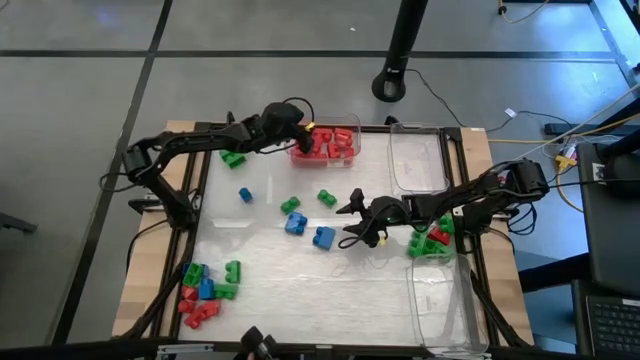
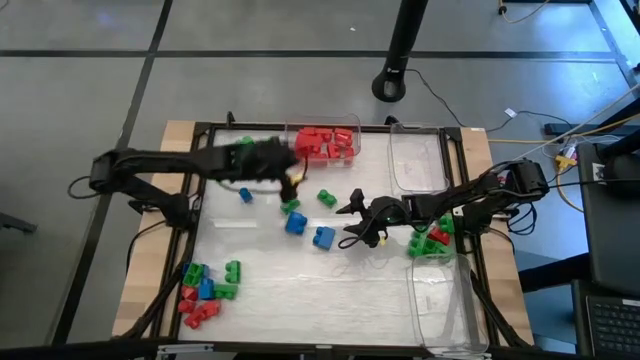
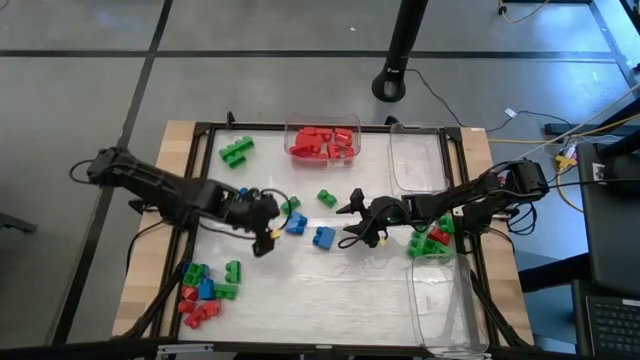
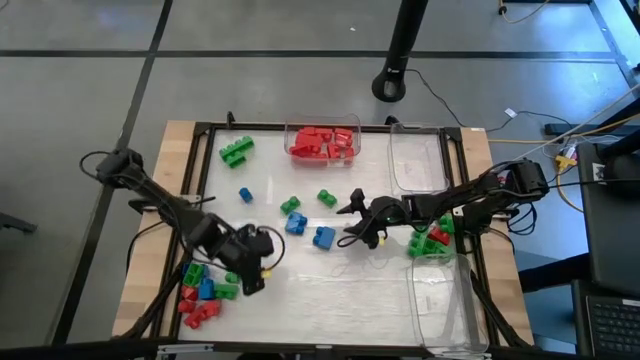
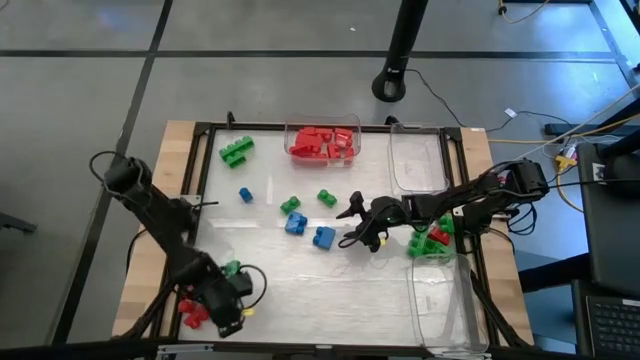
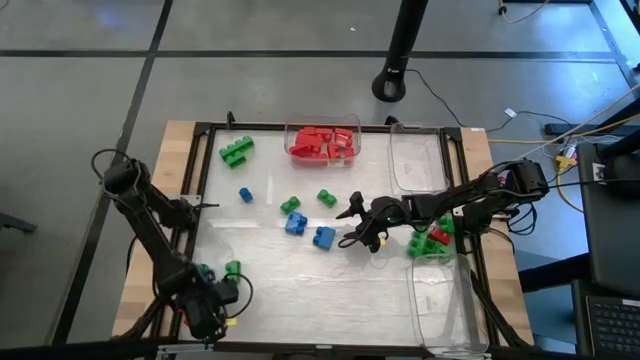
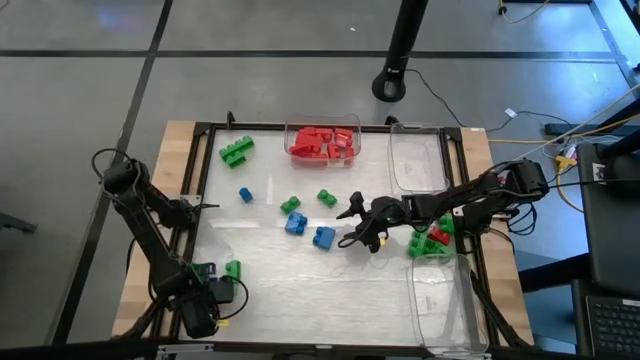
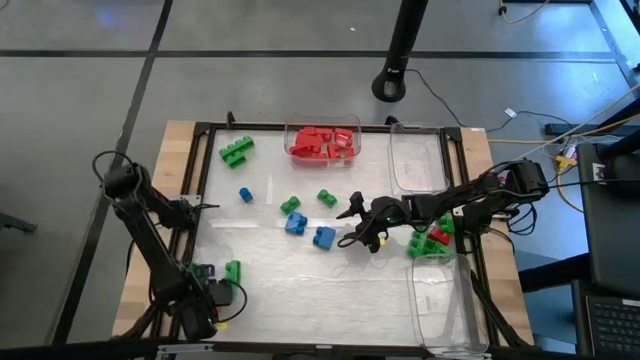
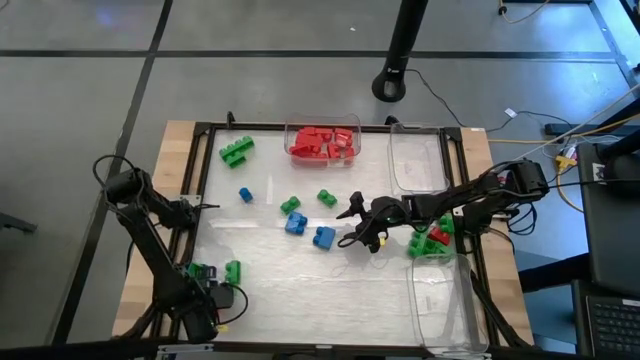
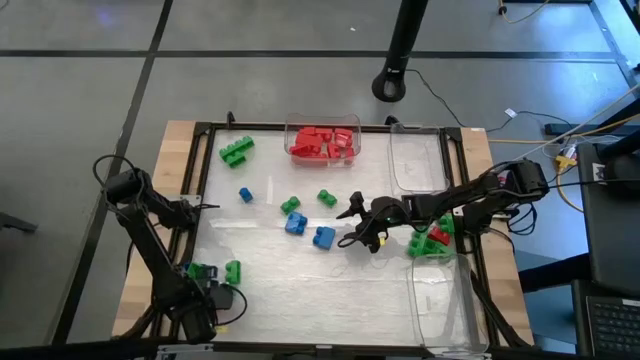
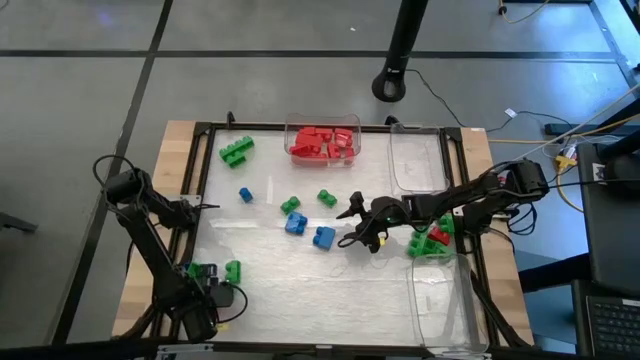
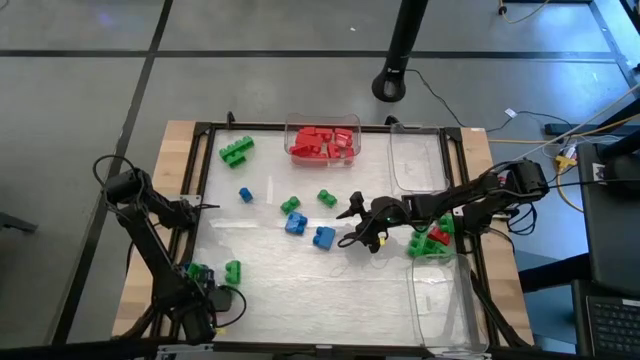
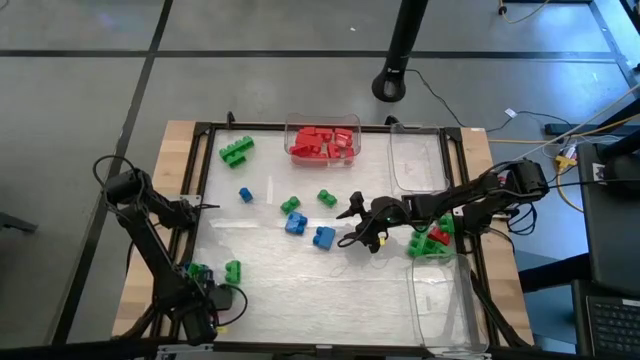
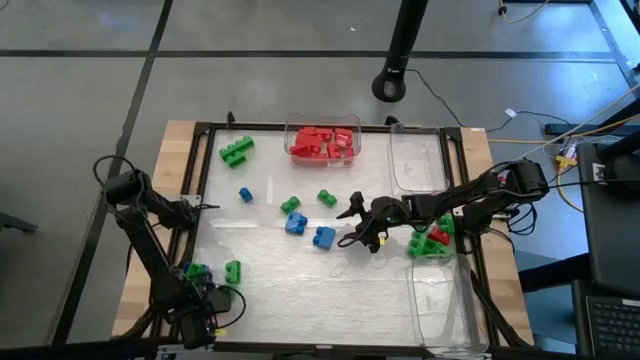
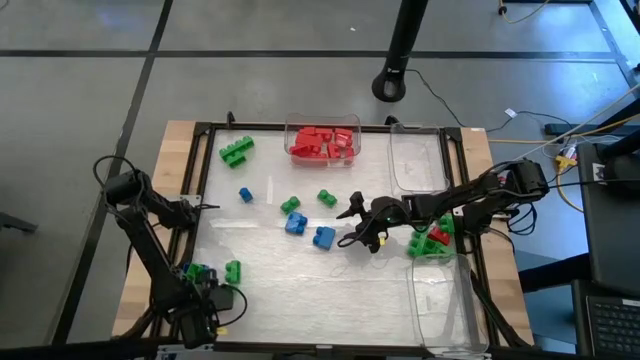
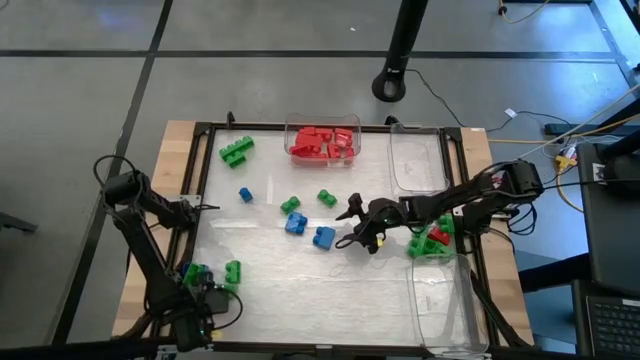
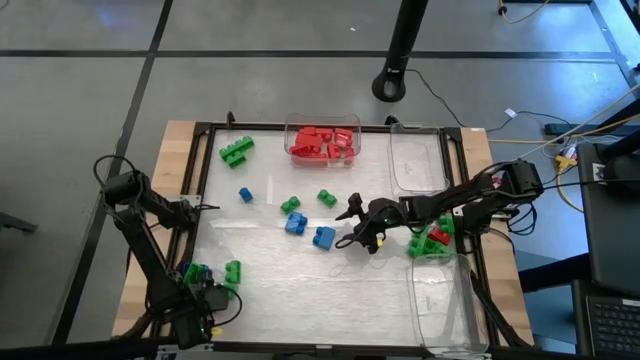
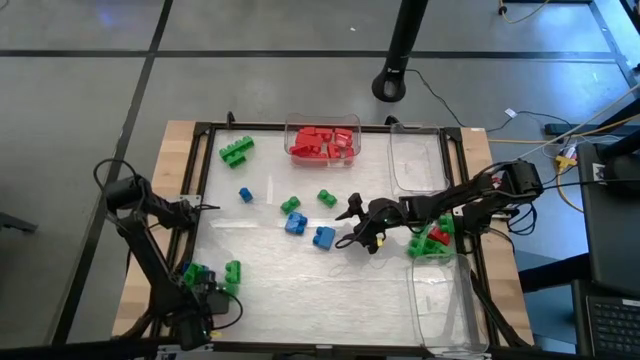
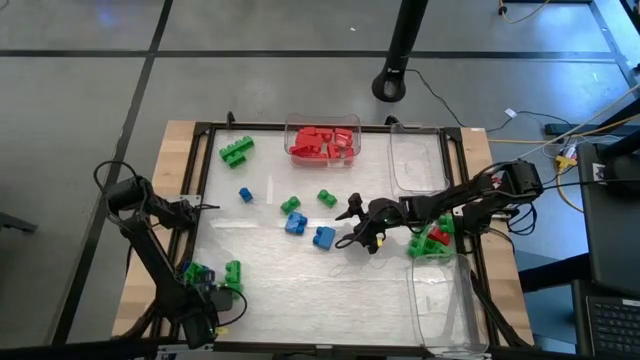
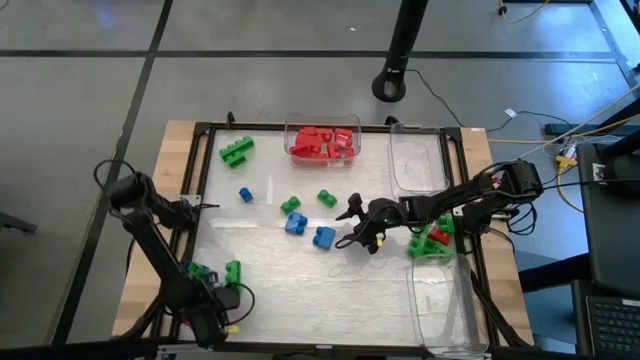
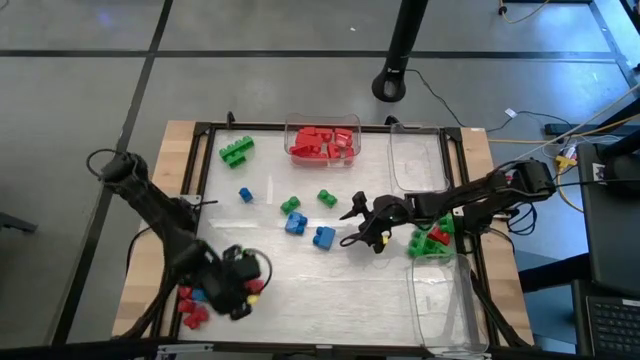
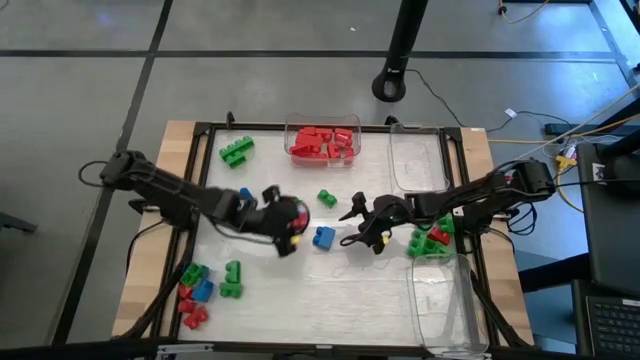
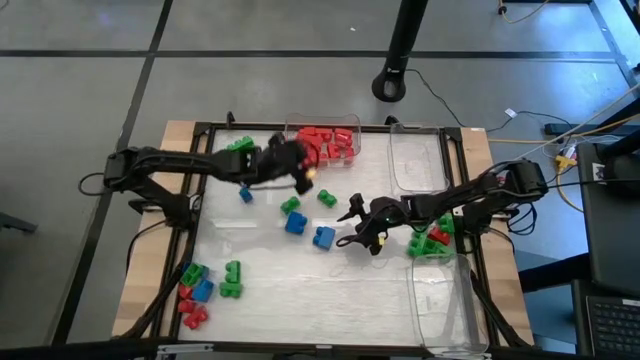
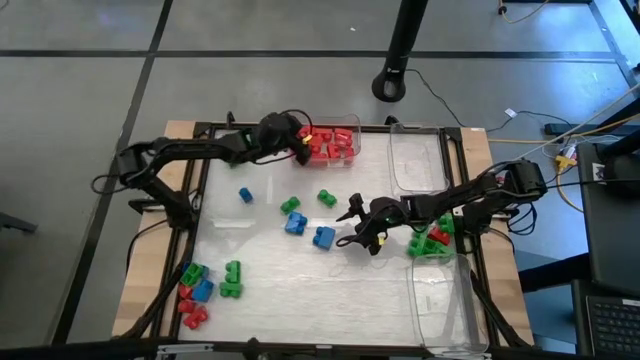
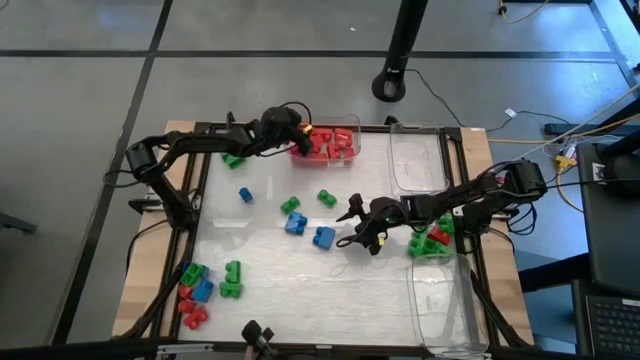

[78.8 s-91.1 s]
Task: Sort blocks
Put the red game piece into the top left transparent bin

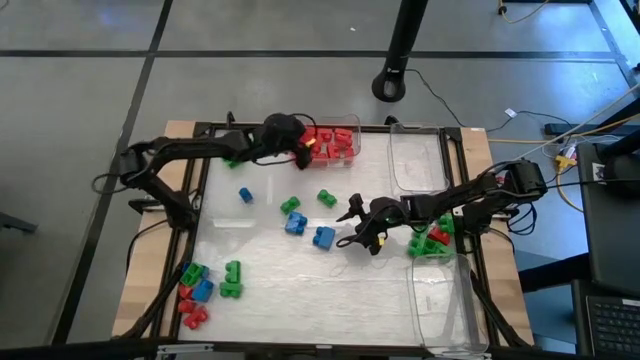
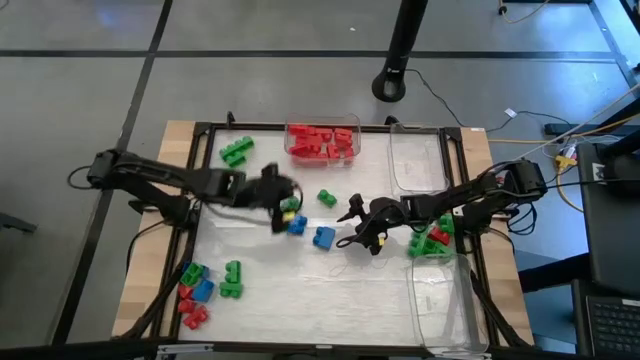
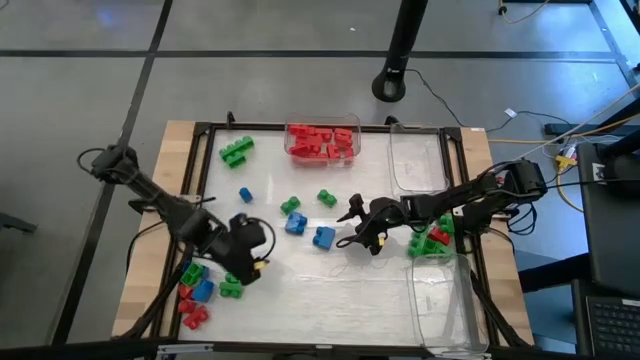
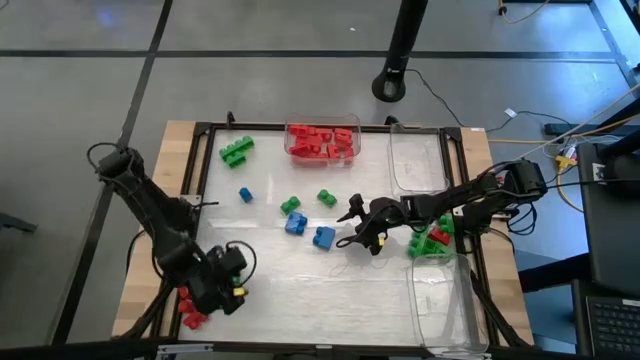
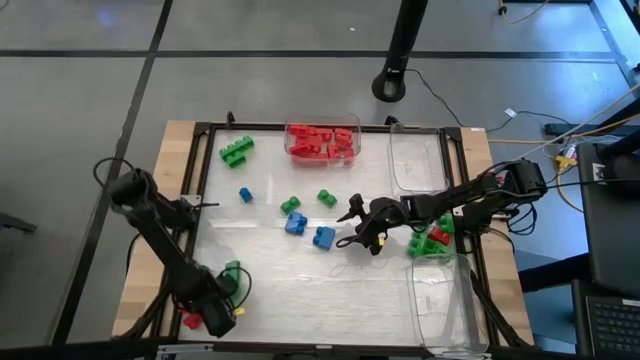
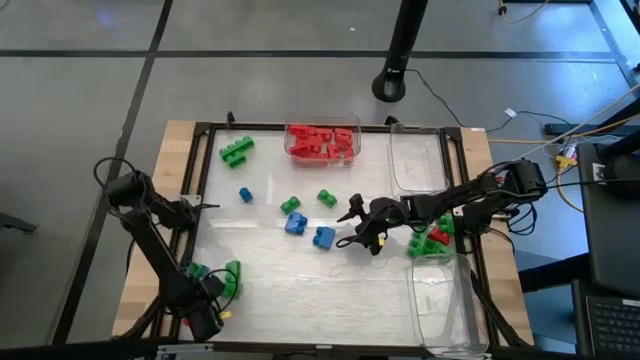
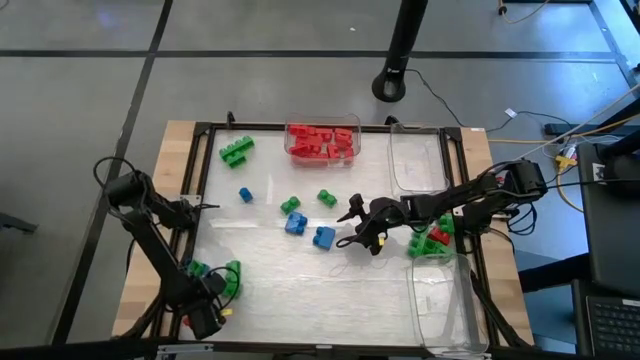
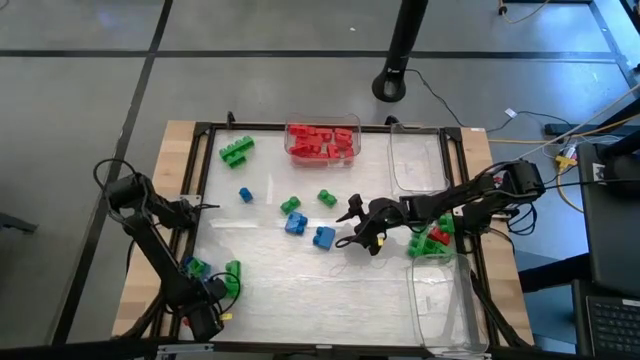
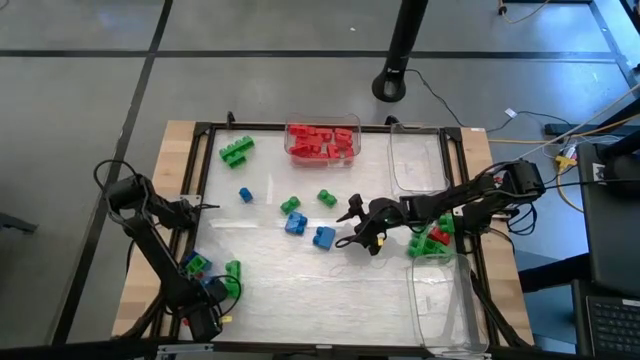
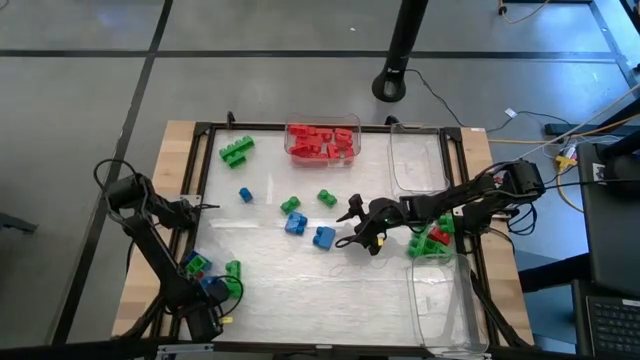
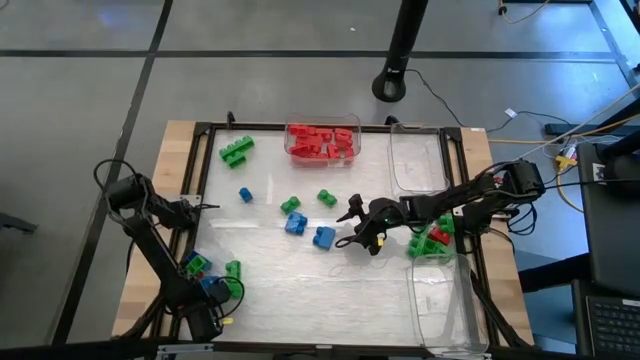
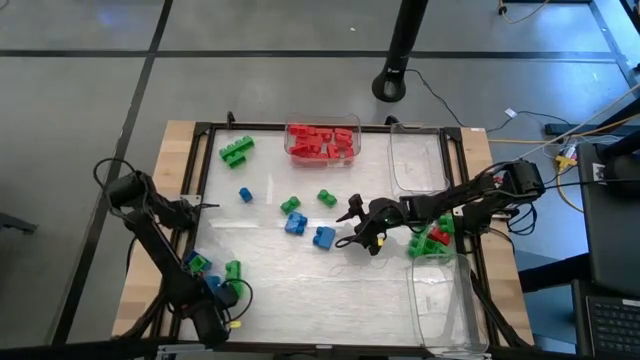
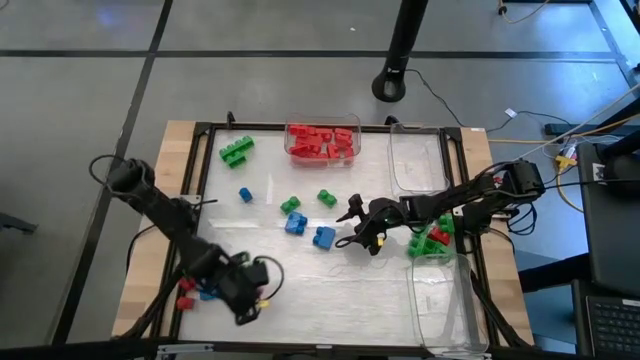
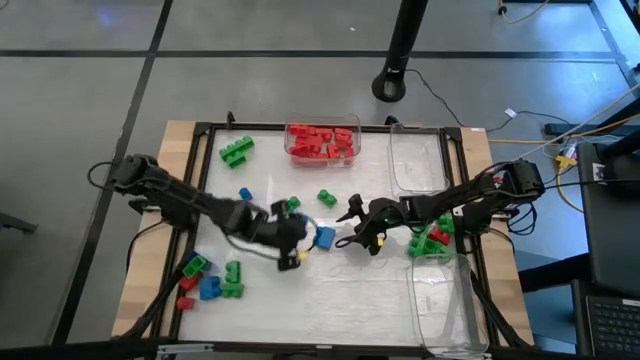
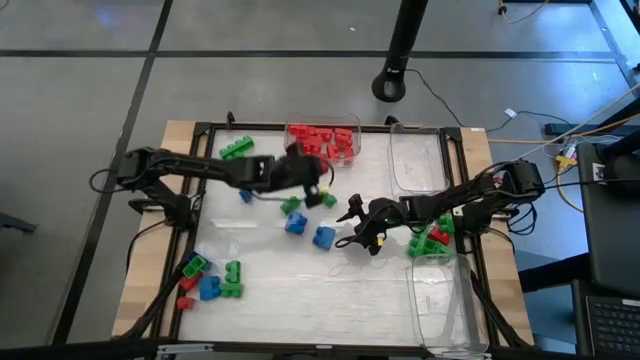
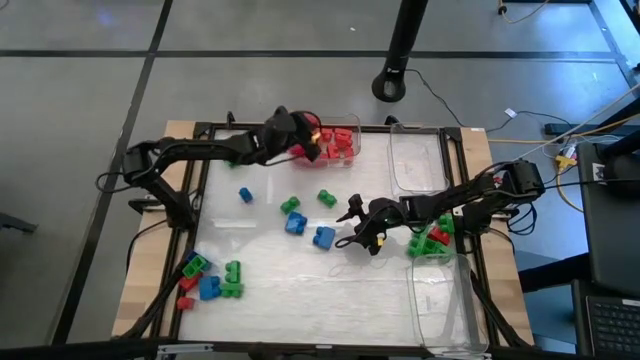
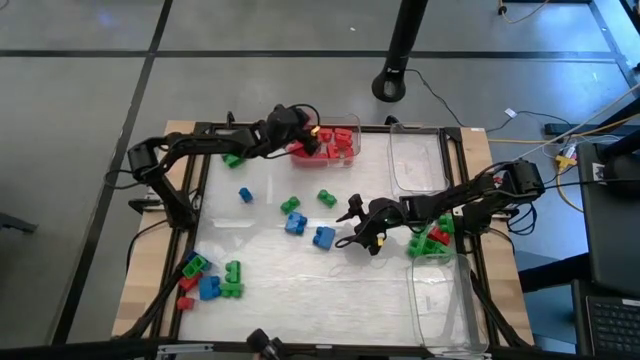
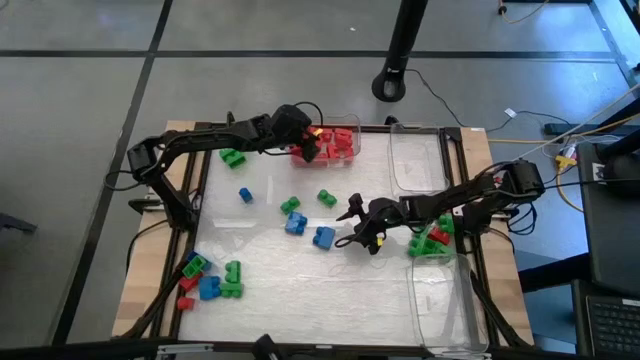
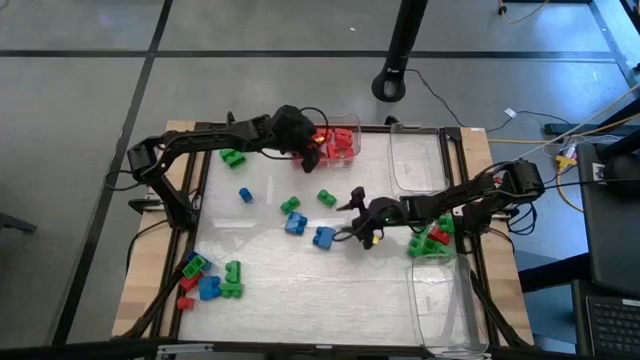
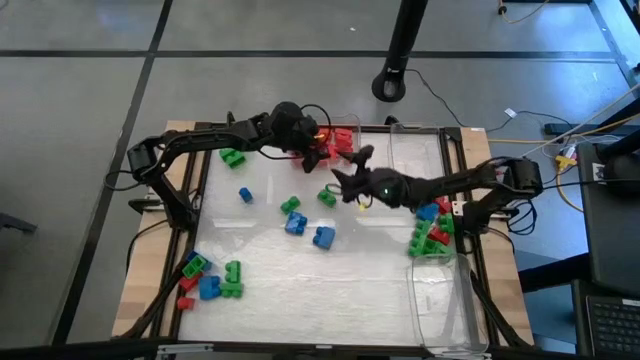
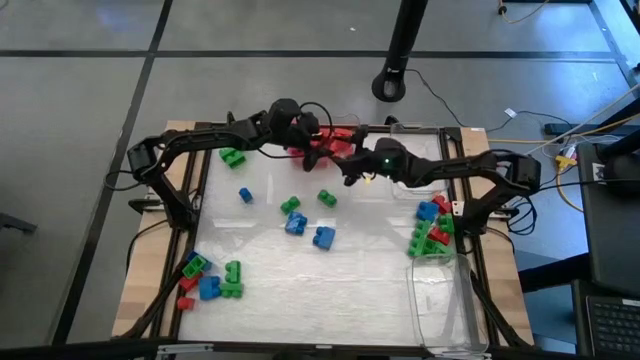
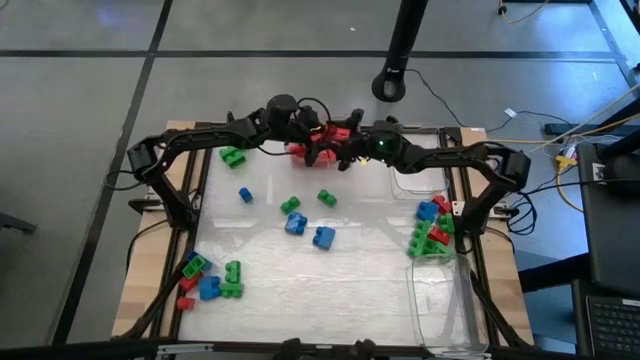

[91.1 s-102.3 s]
Put the red game piece into the top left transparent bin
